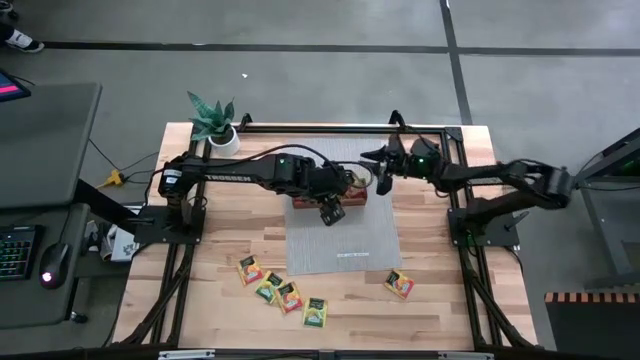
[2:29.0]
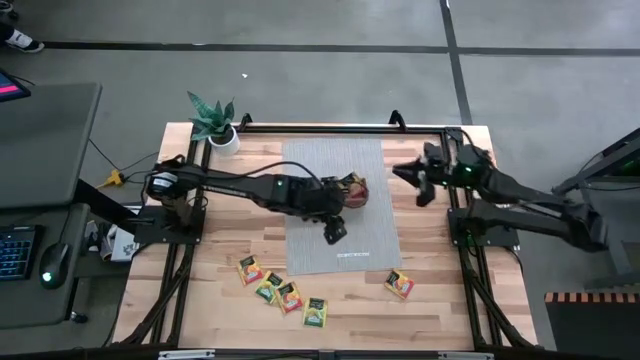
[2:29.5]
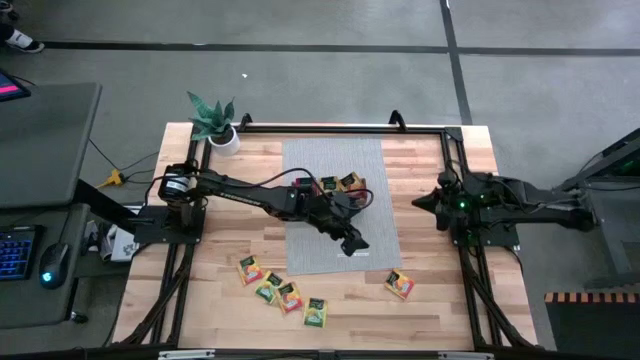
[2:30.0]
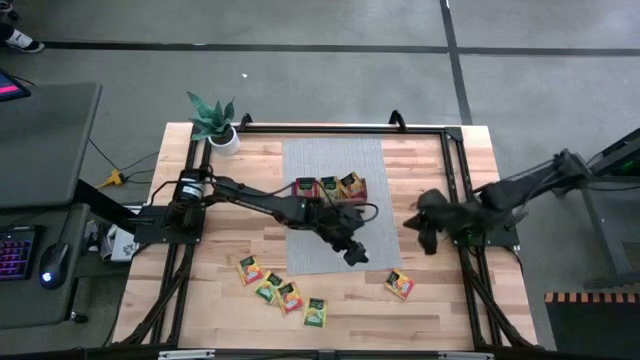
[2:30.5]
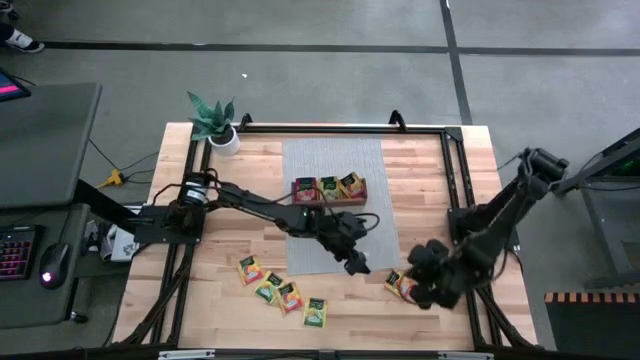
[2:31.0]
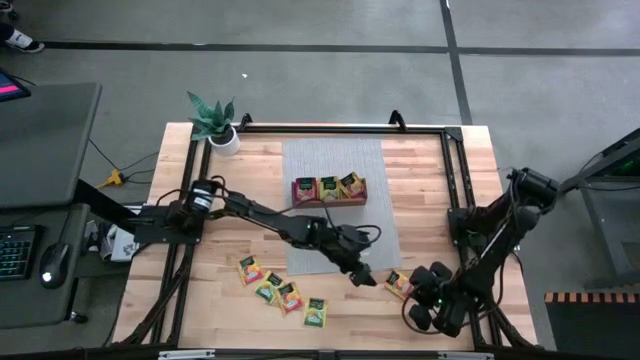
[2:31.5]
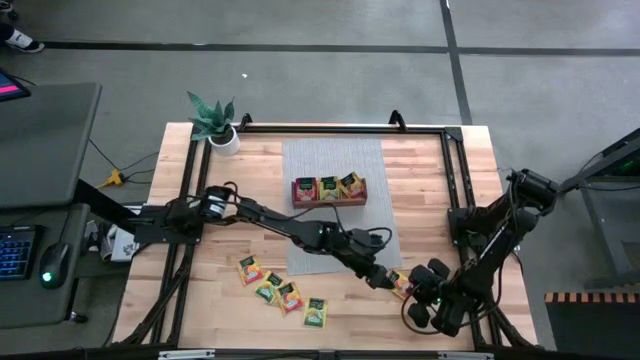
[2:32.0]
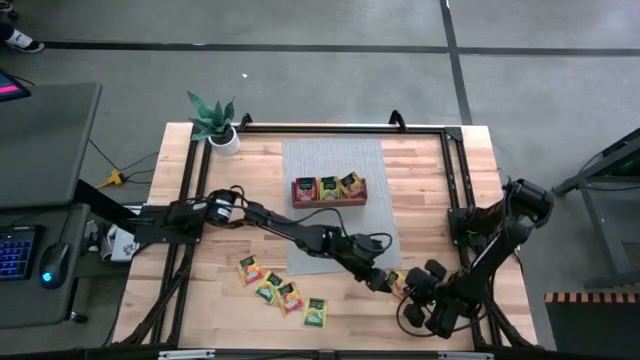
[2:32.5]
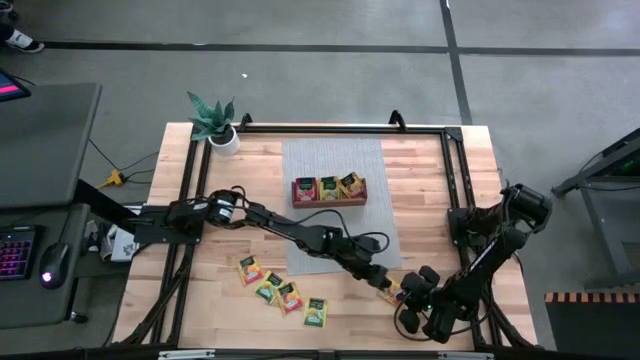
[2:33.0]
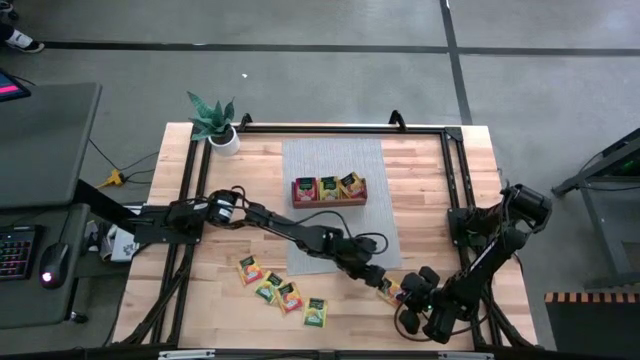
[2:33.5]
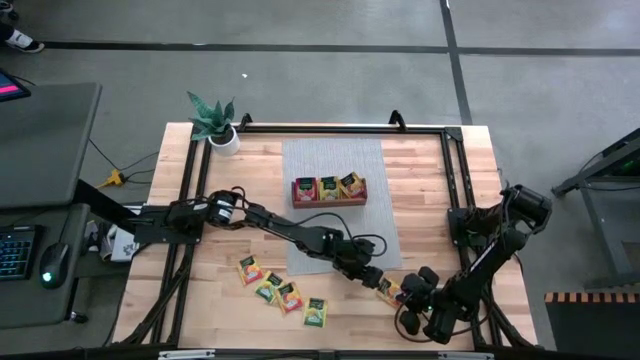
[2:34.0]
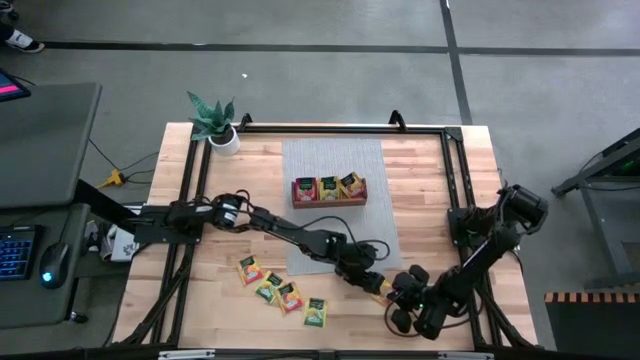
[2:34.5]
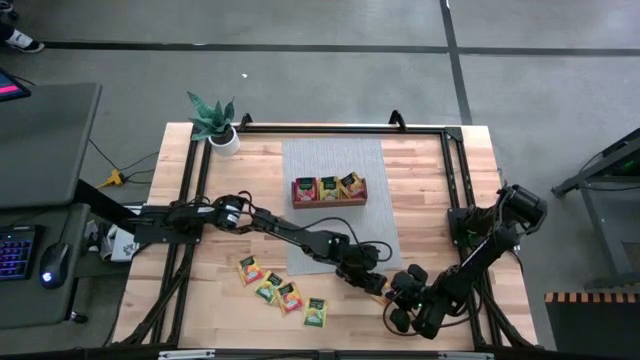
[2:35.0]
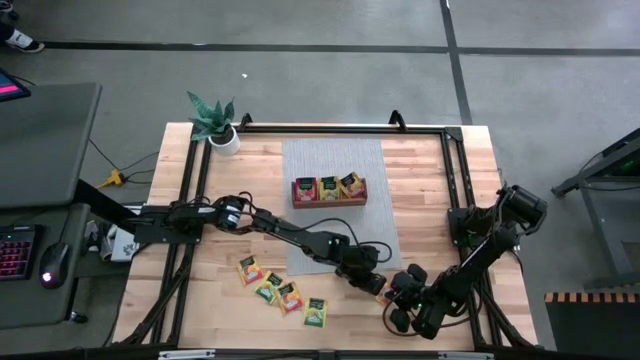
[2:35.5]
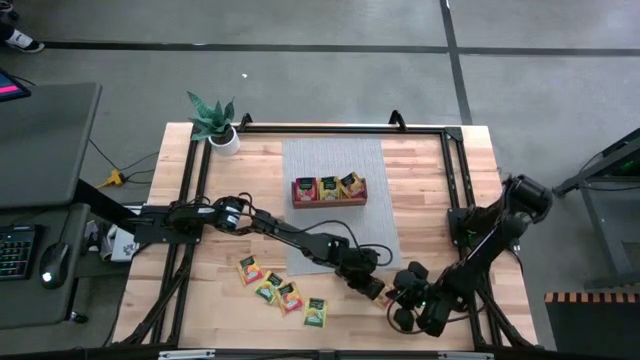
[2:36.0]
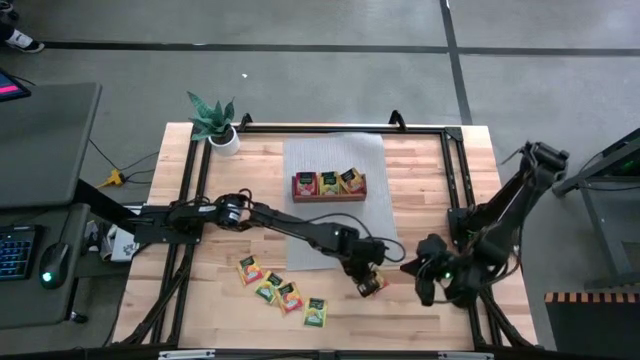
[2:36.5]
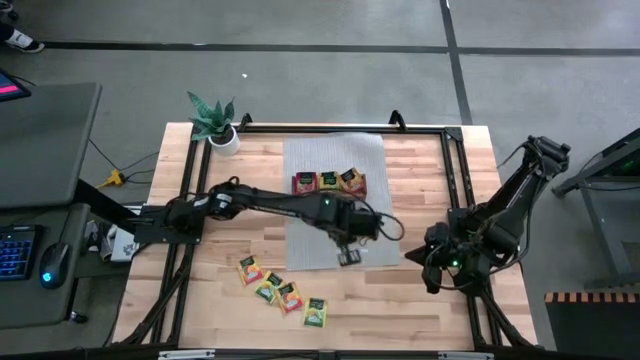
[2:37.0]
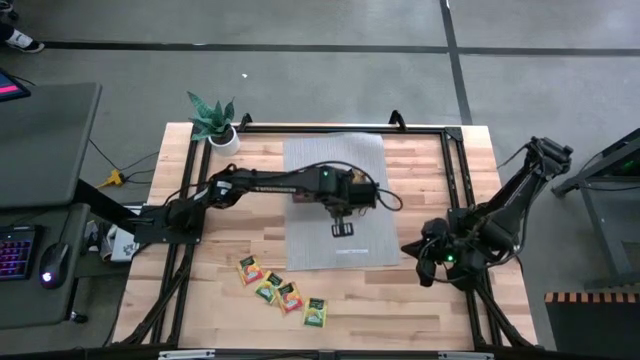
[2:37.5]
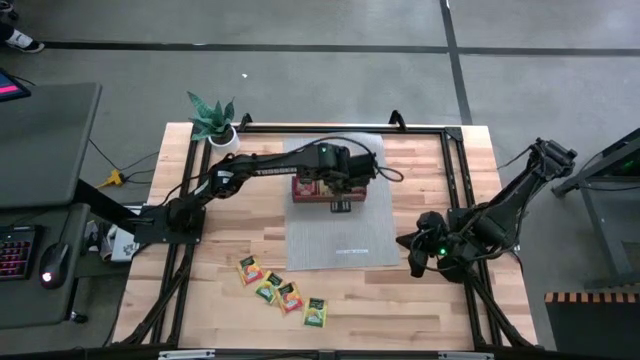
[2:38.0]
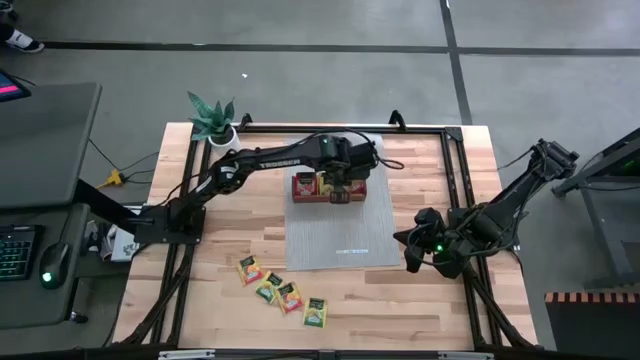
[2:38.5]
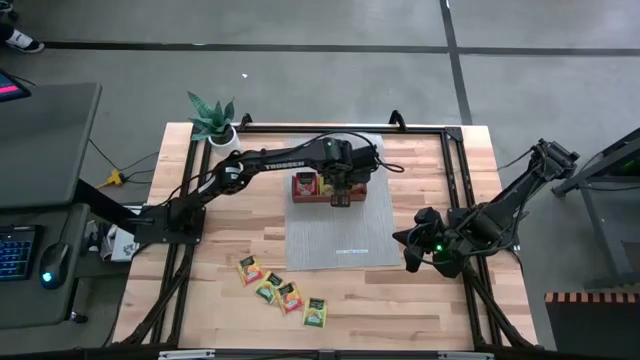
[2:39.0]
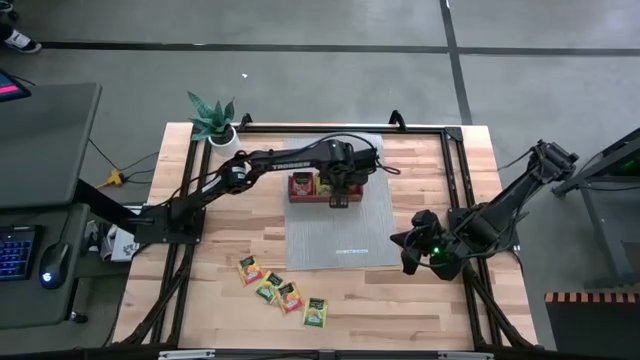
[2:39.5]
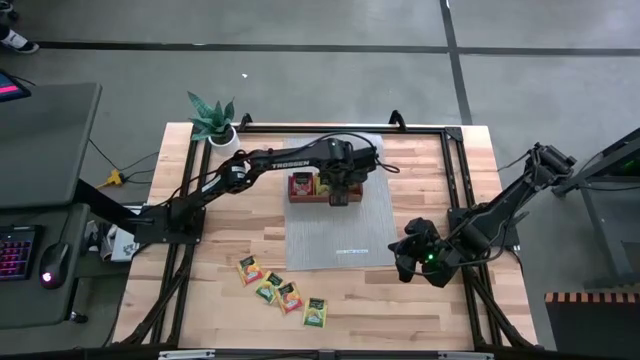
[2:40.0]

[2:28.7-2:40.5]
Task: Pick & Place Tea
Put the orange tea bag into the right section of the wooden organizer

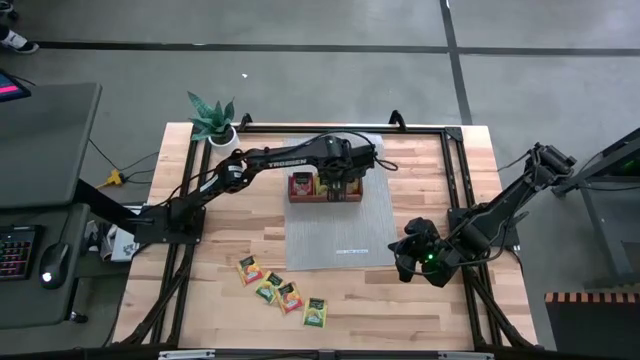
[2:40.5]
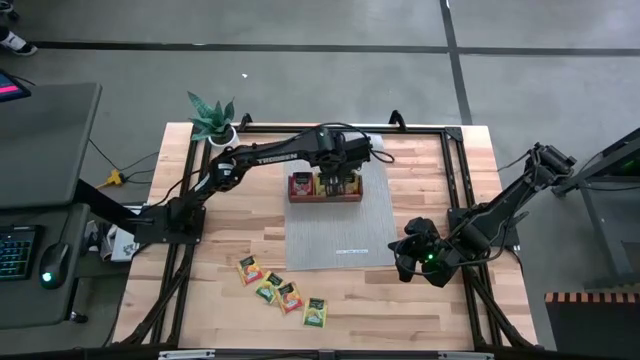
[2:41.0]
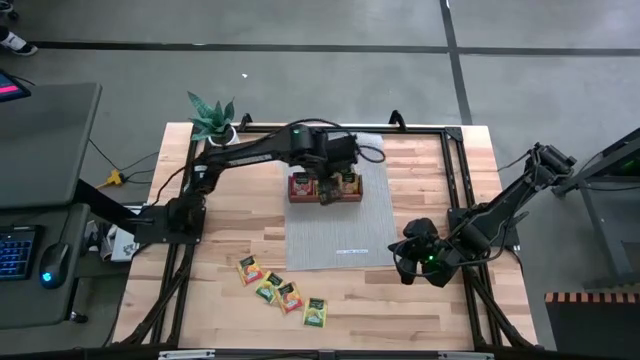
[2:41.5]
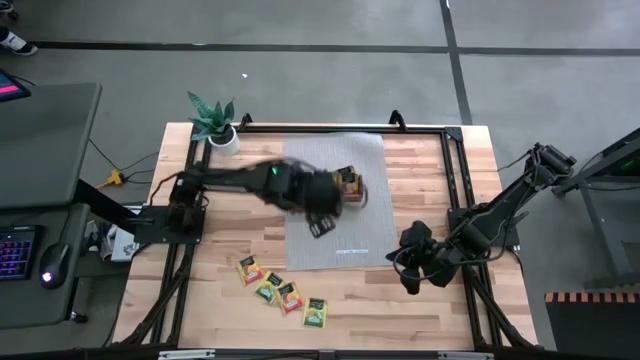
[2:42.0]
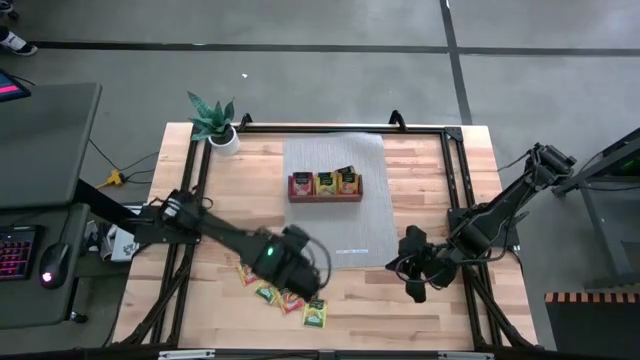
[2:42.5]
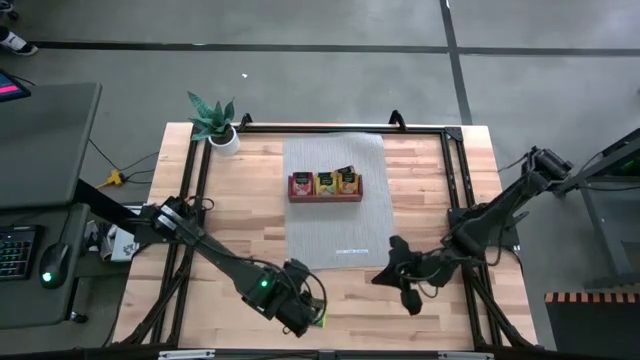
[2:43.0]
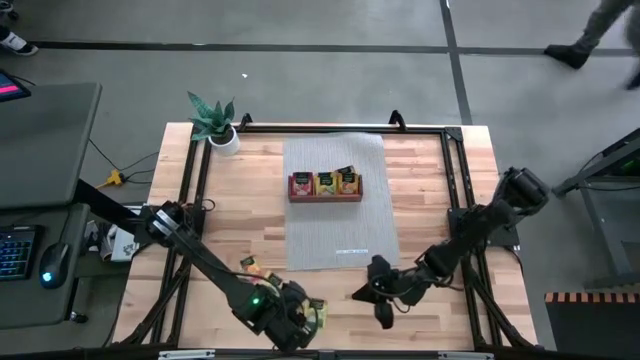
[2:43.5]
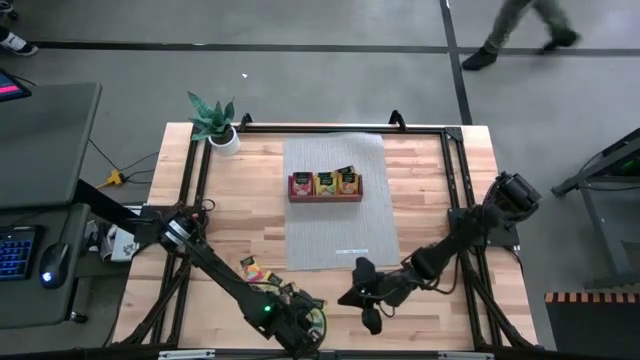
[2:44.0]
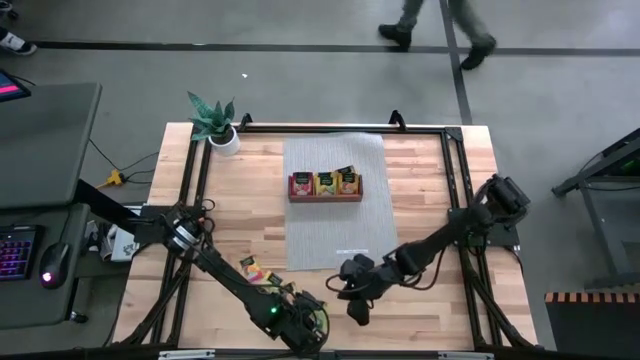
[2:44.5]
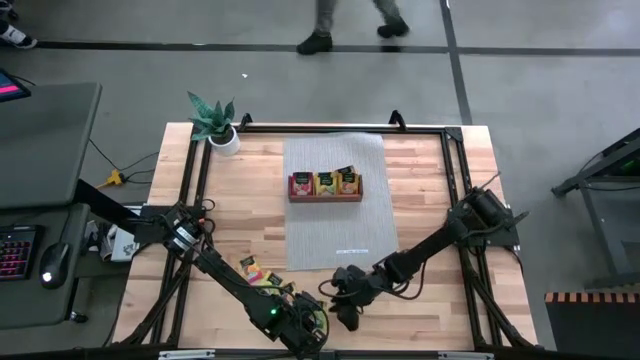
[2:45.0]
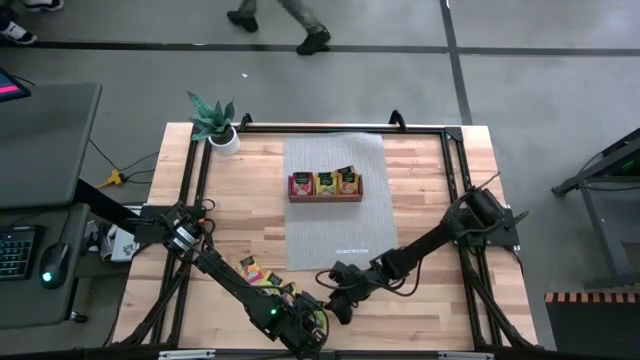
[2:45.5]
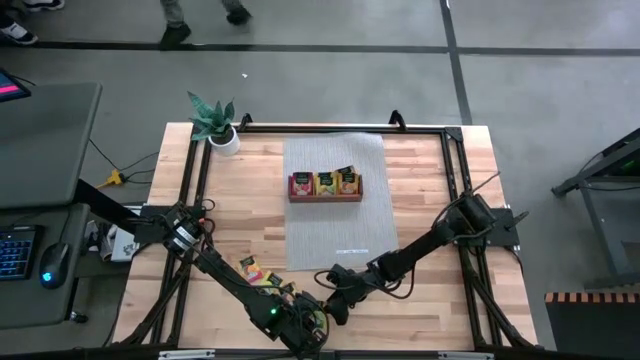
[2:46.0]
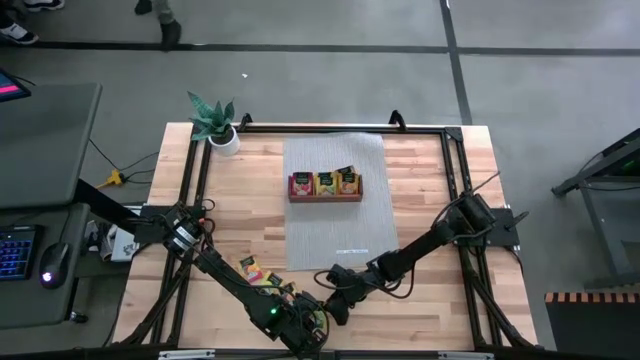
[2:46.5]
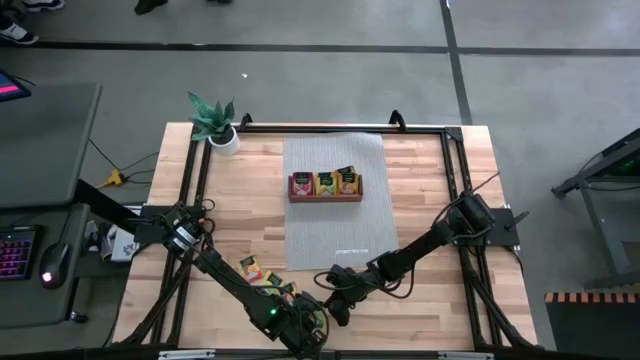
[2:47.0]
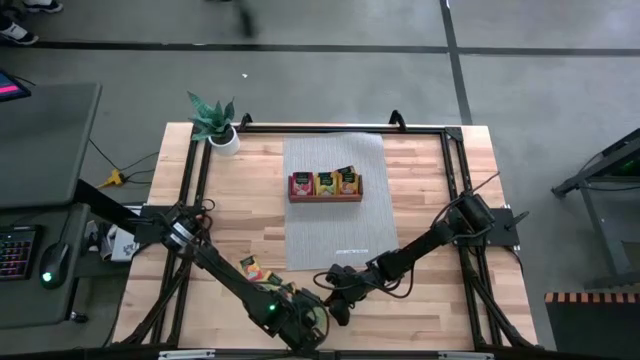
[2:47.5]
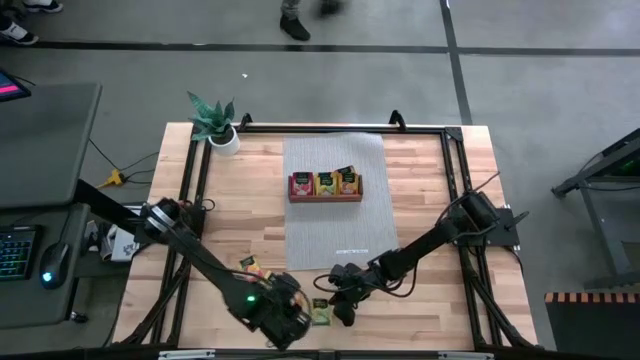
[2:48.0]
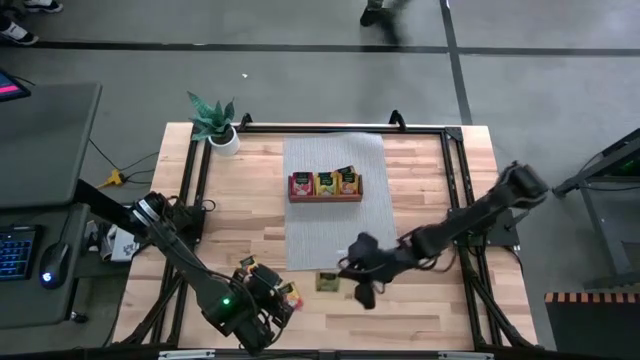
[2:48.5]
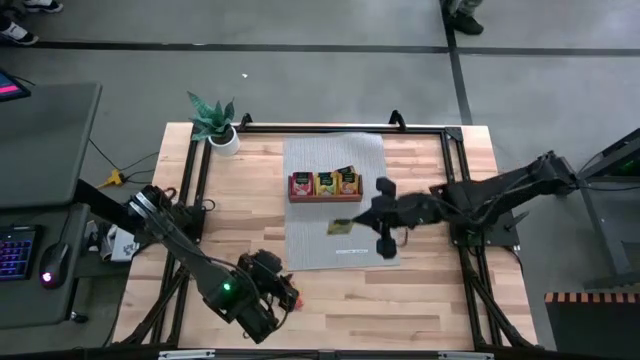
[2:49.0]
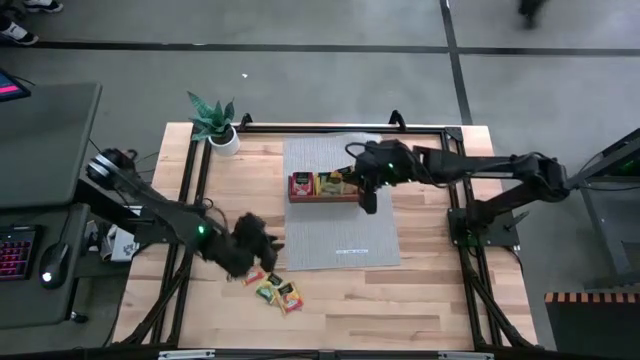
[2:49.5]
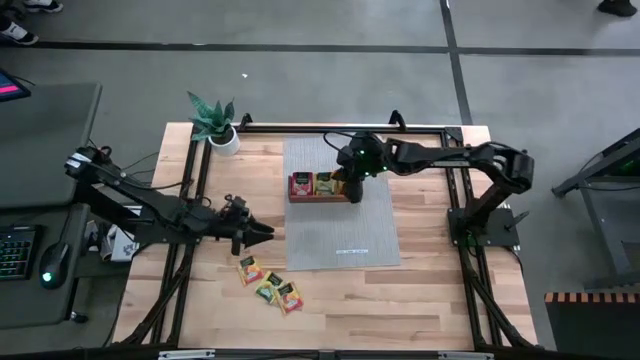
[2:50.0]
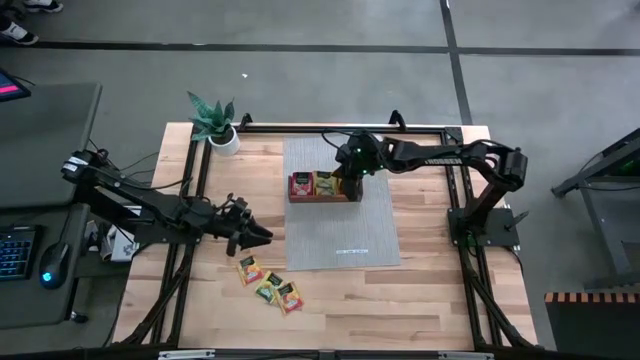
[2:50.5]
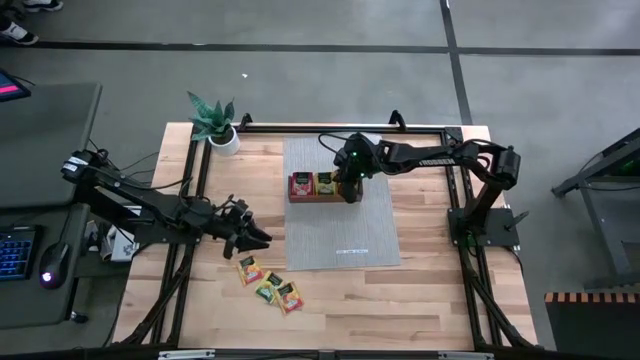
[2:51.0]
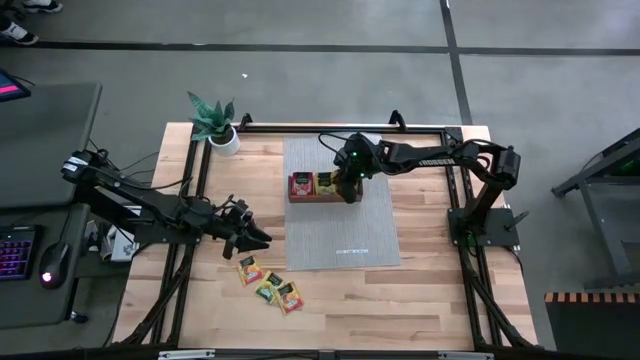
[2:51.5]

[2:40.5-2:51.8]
Put the yellow tea bag into the middle section of the wooden organizer
